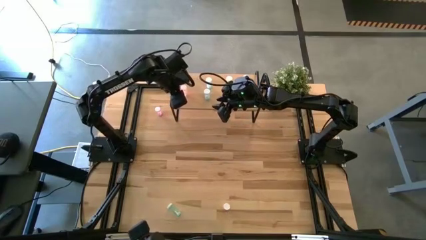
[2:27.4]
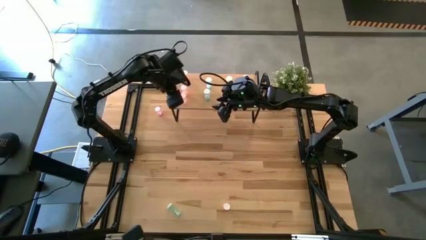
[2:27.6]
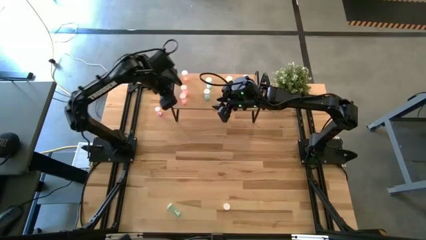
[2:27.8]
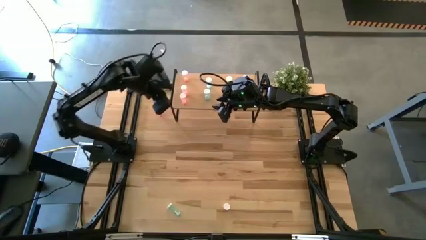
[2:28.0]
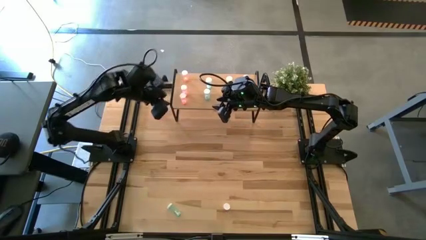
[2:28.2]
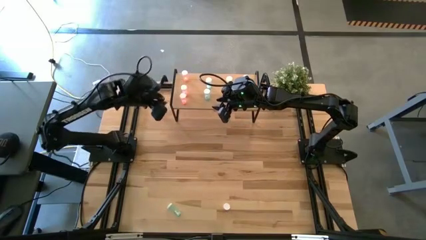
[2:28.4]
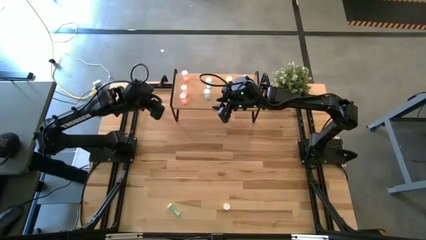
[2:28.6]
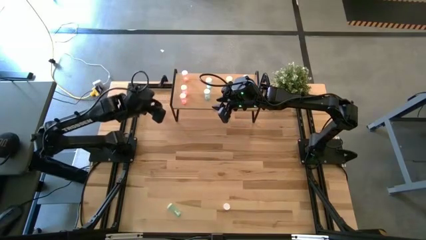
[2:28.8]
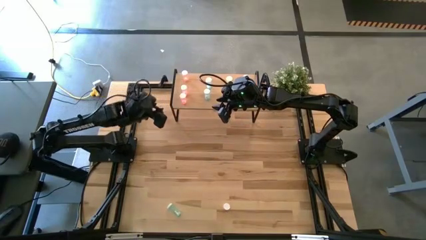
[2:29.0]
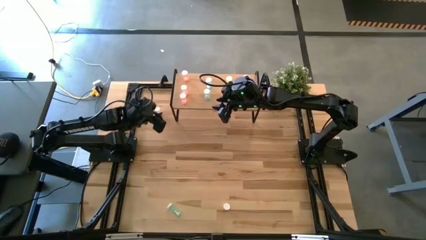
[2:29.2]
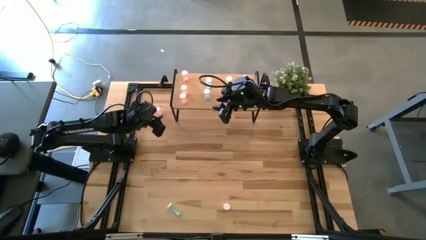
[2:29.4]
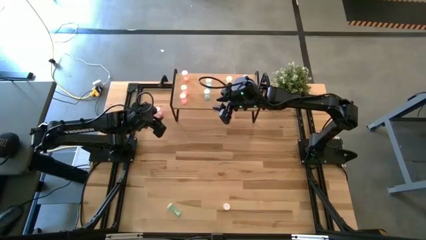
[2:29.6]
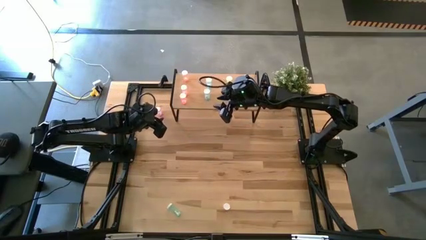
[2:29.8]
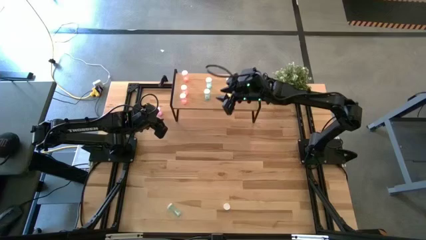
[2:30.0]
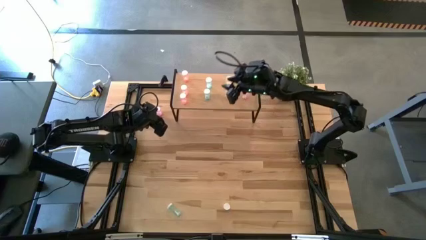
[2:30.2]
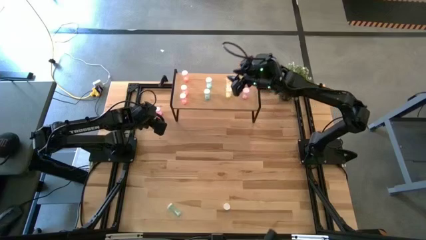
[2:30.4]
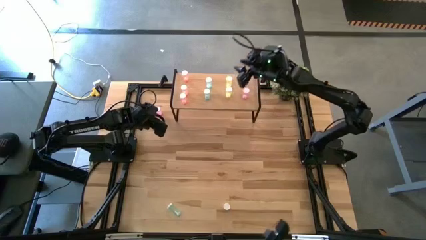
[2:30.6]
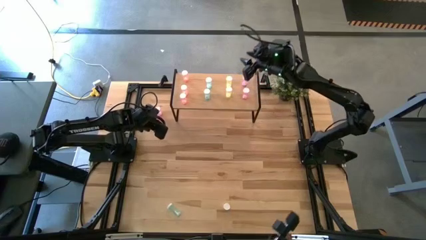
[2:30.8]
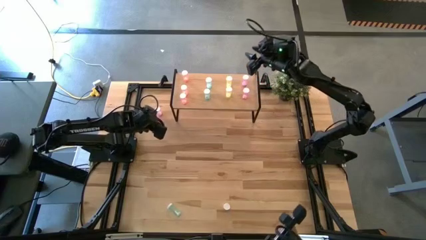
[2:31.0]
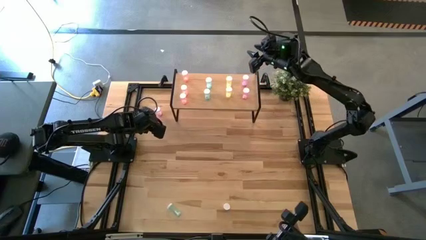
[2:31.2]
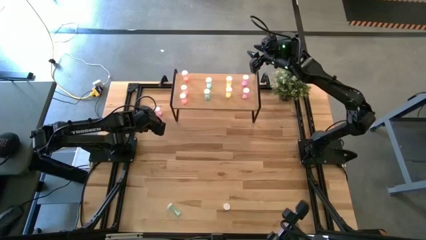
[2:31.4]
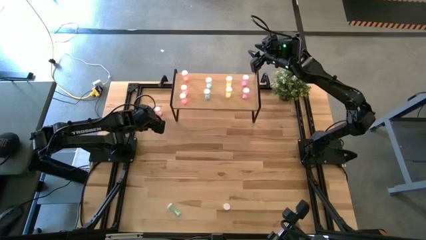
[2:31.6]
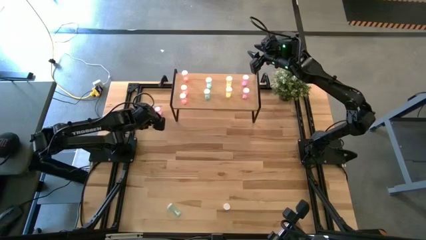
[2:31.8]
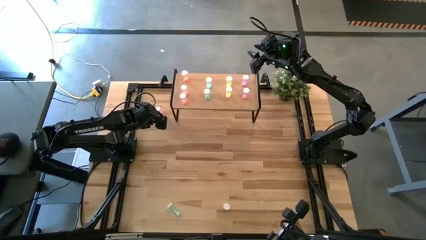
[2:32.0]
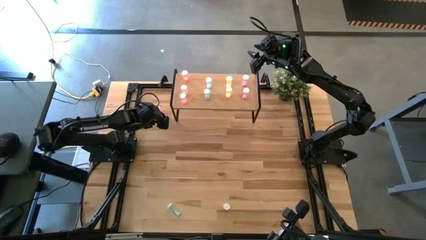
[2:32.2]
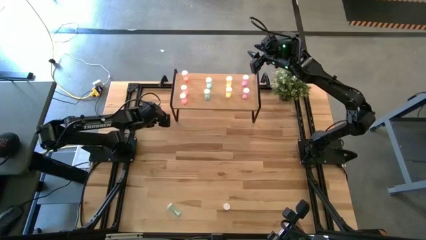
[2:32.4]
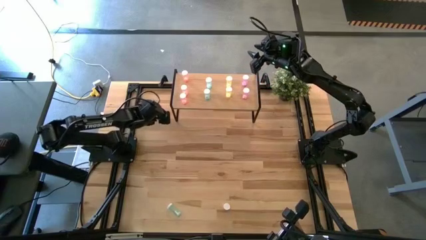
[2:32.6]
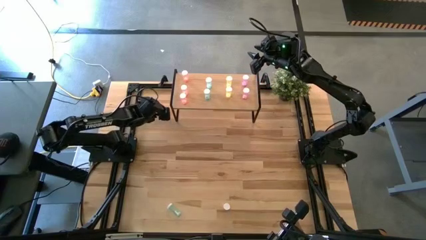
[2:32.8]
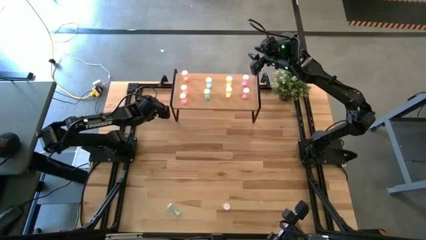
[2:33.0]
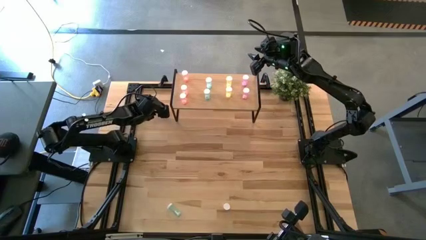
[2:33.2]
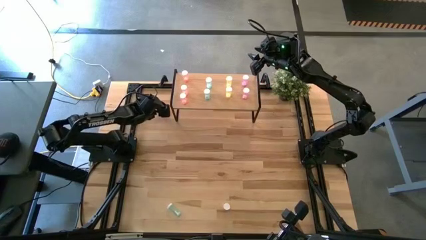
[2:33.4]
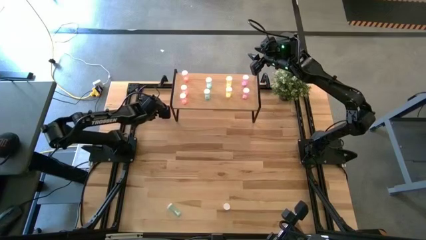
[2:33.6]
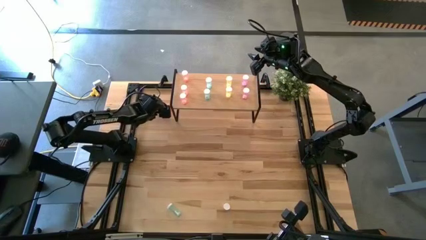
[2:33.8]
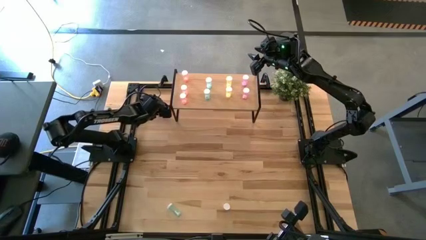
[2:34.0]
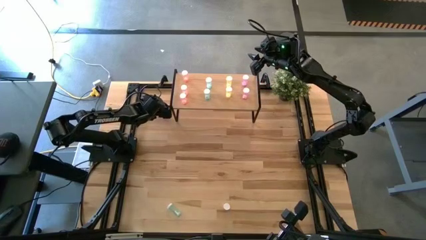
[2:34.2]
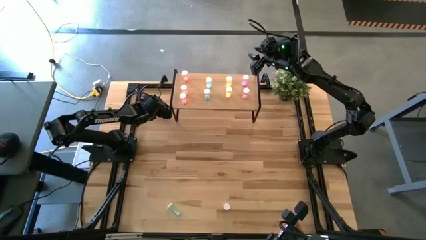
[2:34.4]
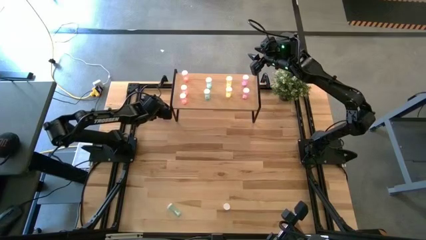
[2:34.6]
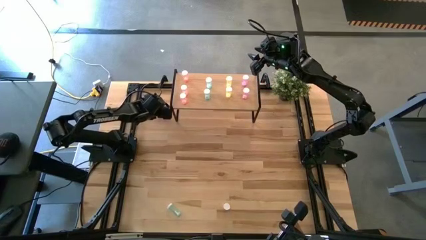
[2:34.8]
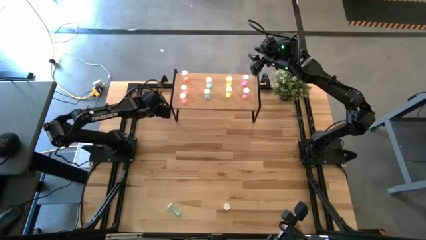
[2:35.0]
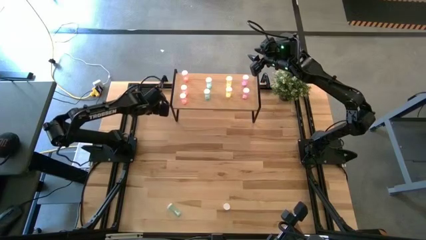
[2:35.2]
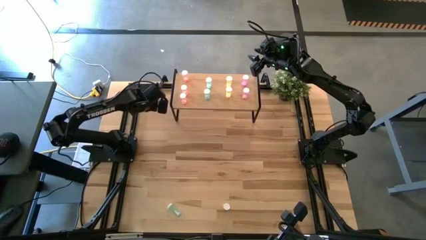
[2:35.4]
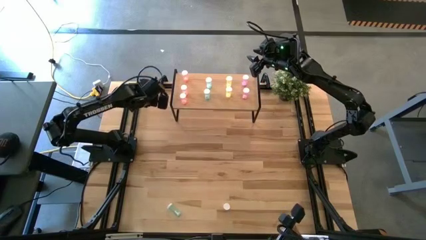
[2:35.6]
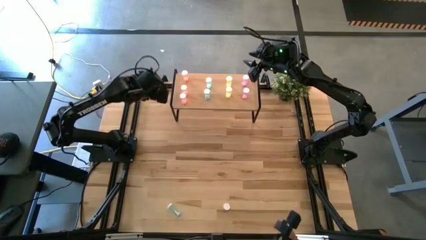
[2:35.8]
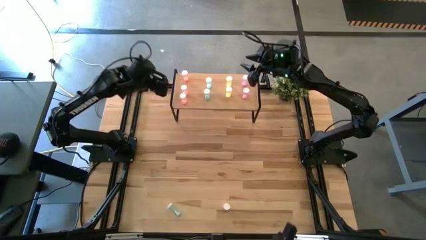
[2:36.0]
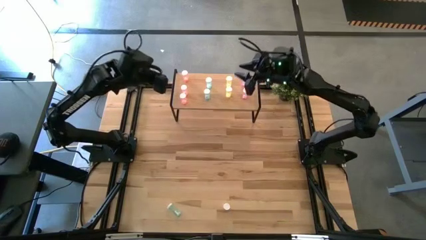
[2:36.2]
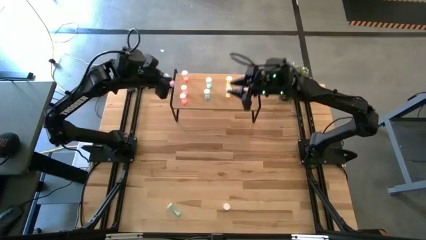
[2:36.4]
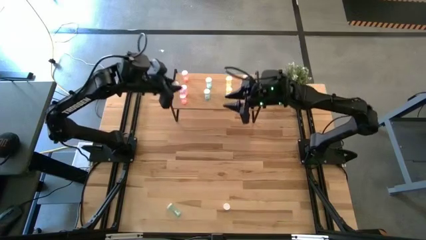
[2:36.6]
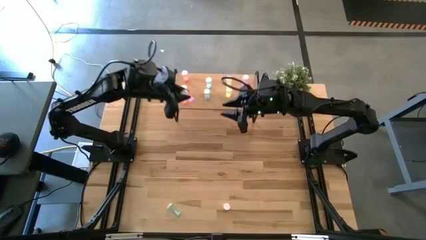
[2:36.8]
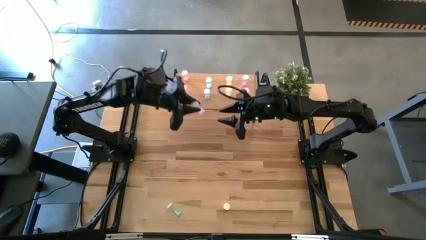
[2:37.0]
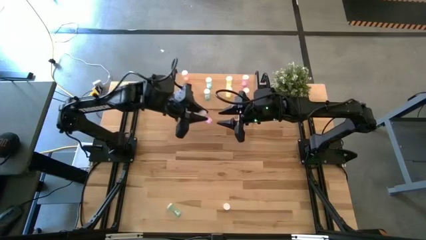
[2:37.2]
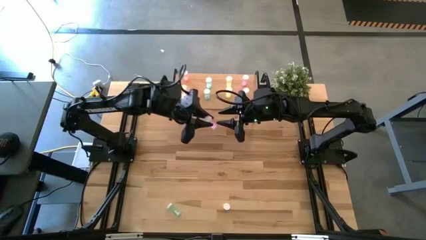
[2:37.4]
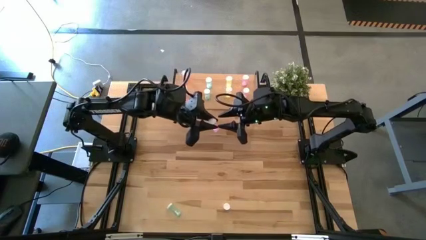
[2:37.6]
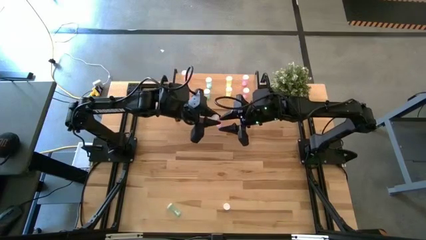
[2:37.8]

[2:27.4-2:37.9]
Task: Pick and place medicine bottles onto shelf by color
Put the purple pill bottle on the shelf aligned with the other purple pill bottle
